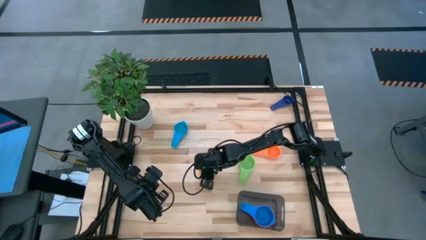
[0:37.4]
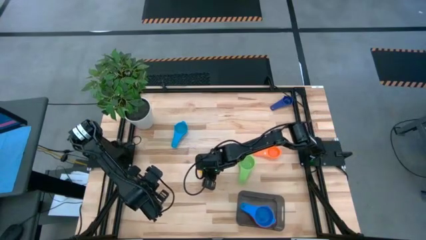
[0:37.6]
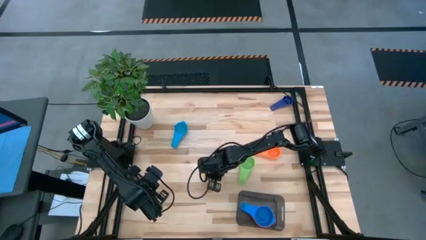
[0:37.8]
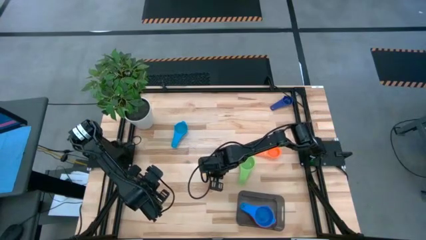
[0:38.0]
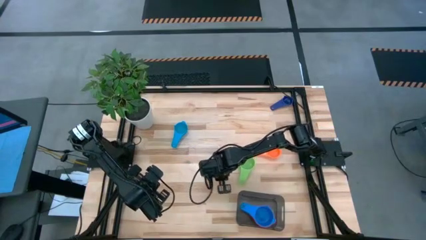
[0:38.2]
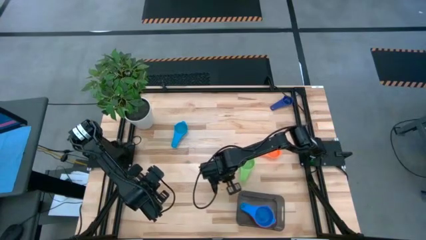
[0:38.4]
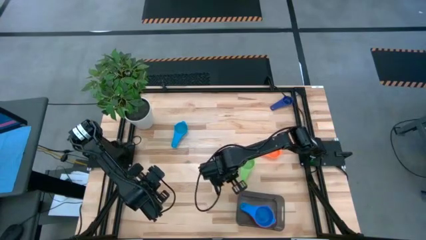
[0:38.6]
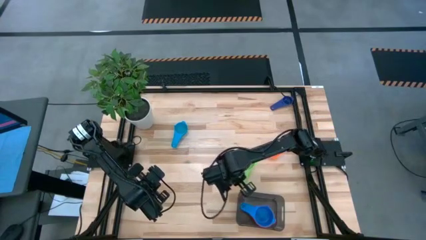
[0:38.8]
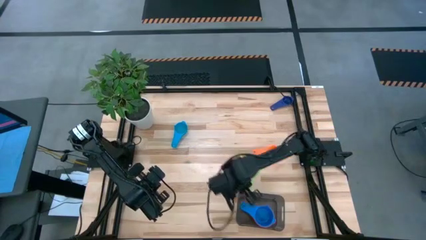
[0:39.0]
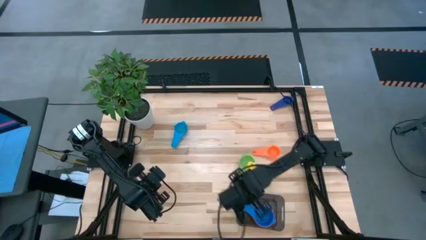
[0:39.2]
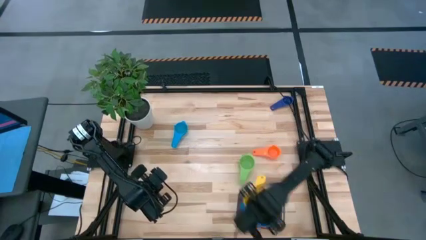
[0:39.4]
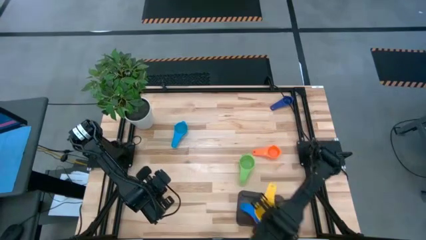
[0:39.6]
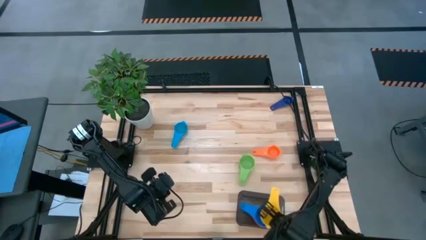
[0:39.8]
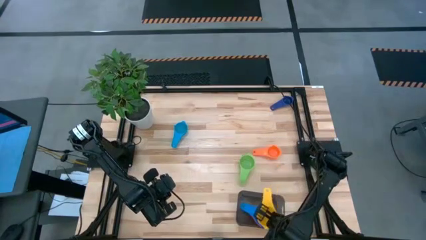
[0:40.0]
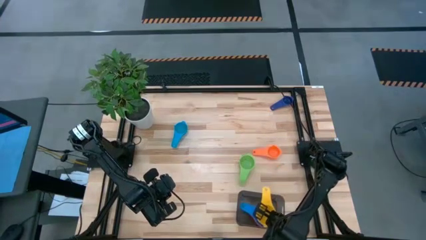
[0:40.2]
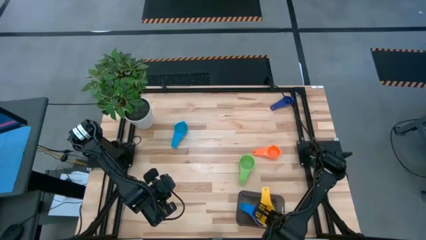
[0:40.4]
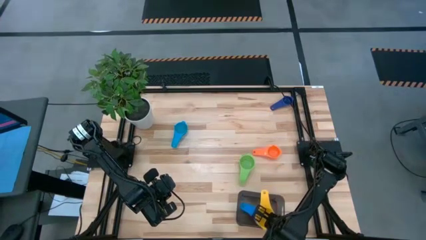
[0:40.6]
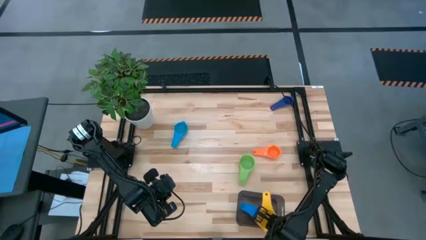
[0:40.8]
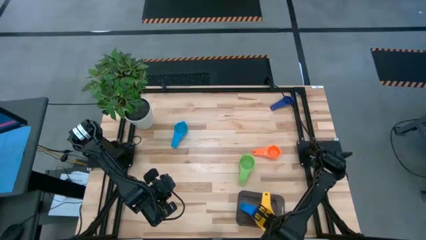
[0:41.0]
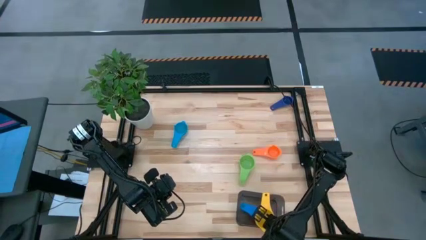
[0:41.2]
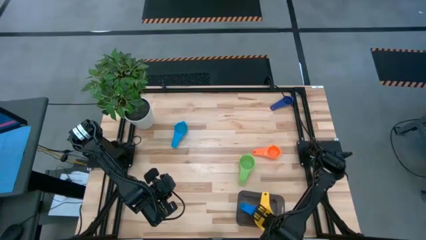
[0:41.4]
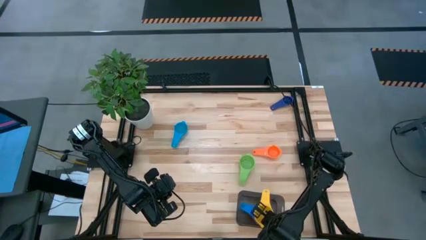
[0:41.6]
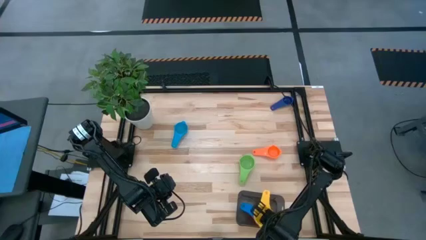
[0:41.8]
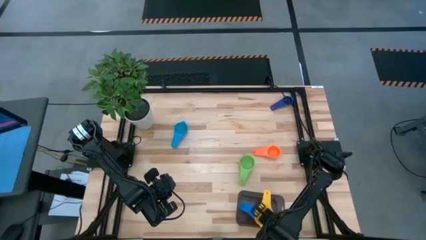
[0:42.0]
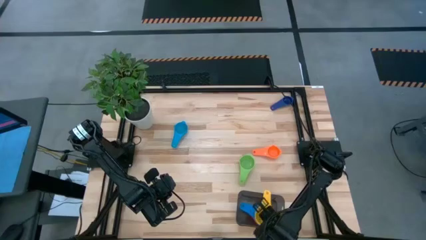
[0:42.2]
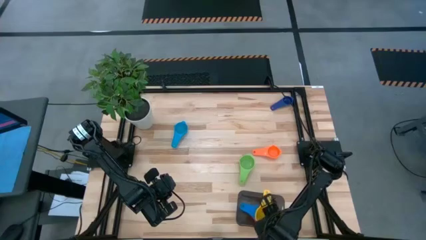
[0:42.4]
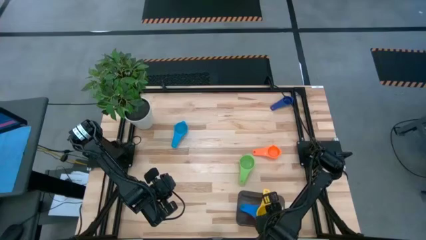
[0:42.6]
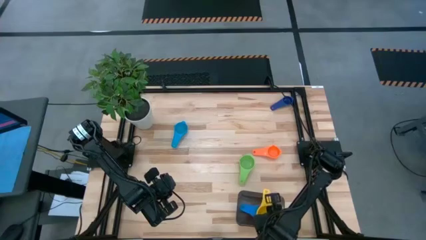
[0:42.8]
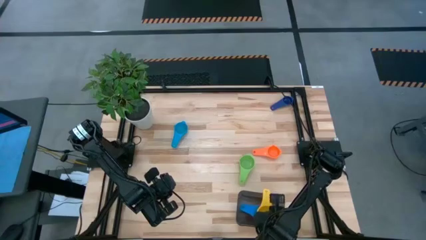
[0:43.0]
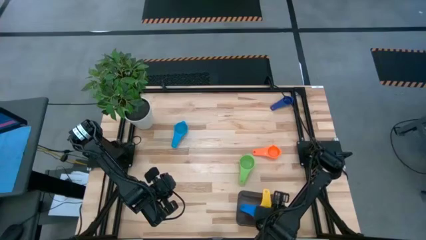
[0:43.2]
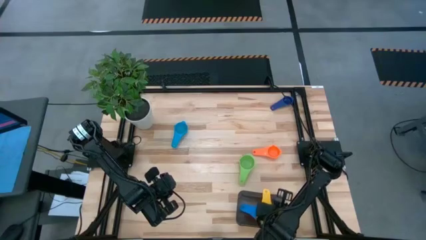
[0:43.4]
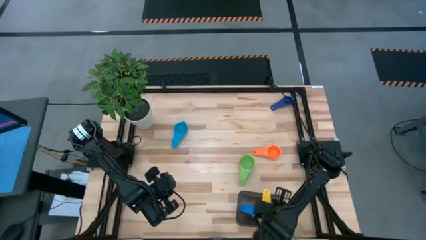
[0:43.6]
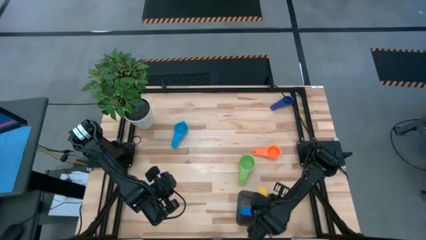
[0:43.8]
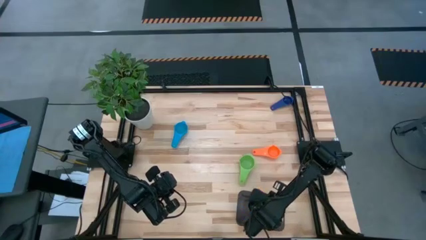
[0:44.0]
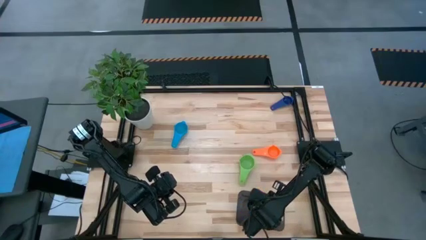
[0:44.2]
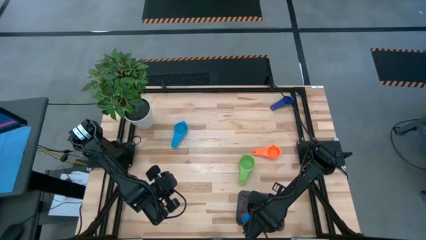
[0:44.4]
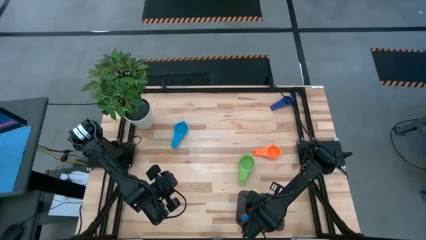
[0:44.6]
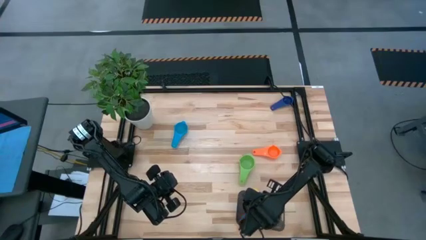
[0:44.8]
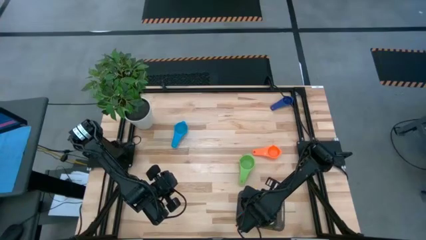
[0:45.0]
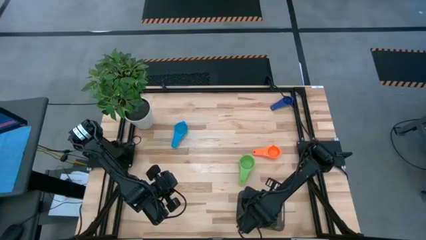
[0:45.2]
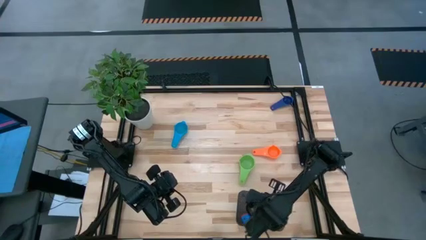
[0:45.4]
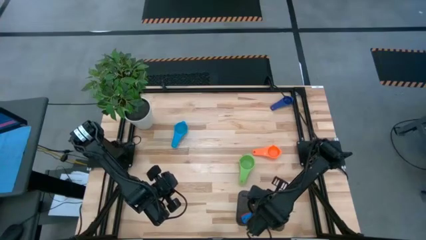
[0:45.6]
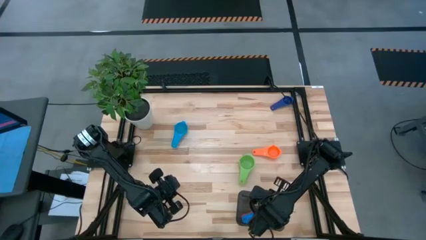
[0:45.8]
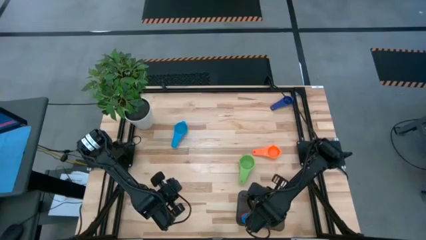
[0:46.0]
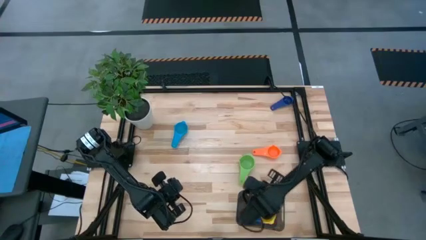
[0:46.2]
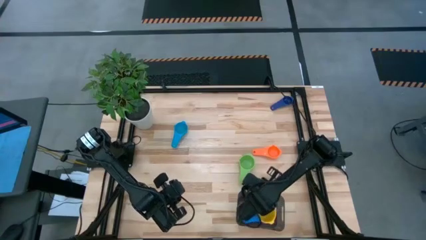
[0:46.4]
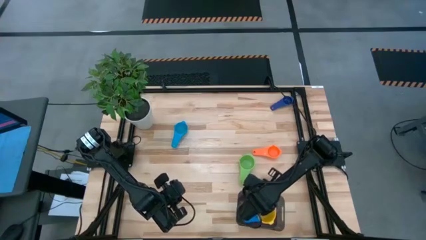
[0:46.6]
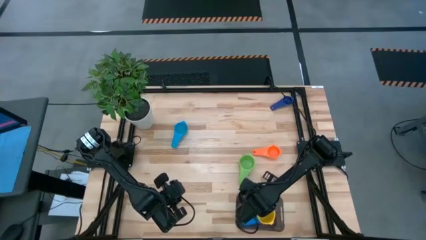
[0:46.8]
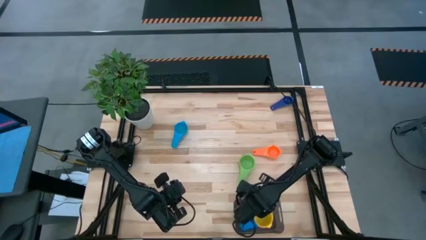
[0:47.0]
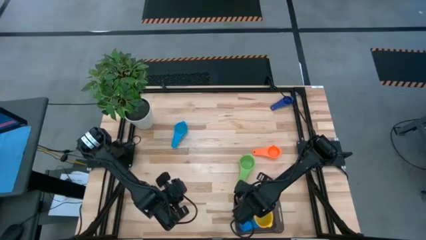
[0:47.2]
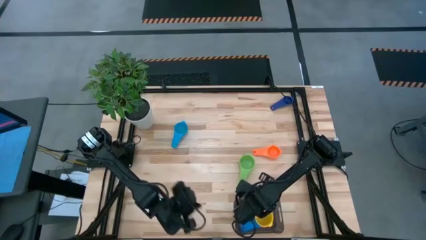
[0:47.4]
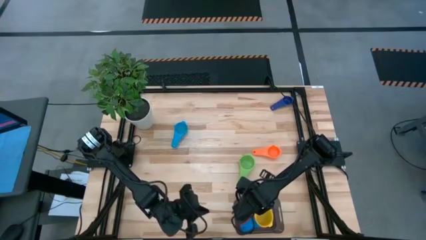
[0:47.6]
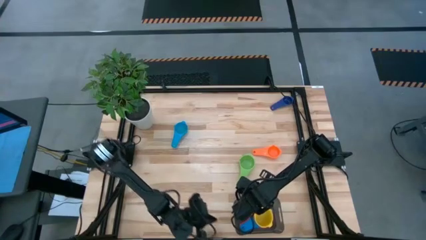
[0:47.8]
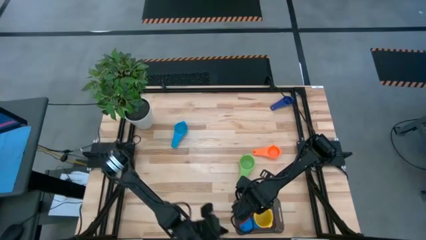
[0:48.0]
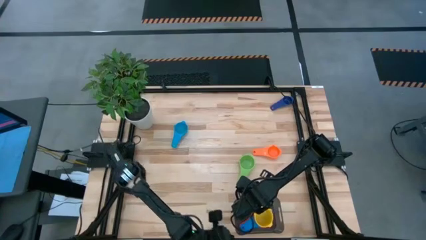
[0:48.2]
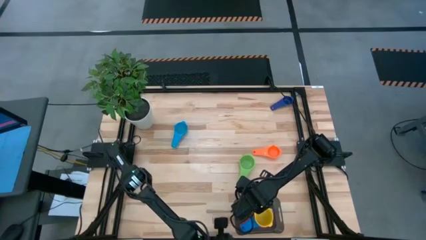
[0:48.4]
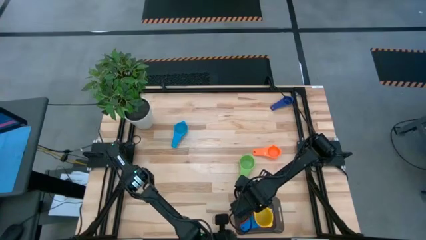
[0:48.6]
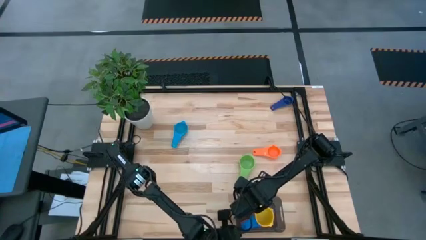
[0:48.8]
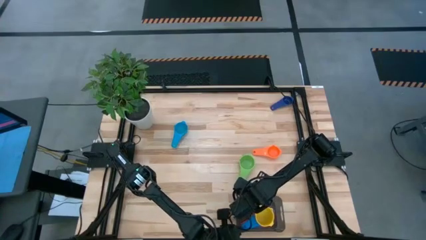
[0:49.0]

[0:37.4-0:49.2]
Task: Nest measuring cups in basket
Stack the yellow measuring cup on top of the blue measuring cup in the black bin
